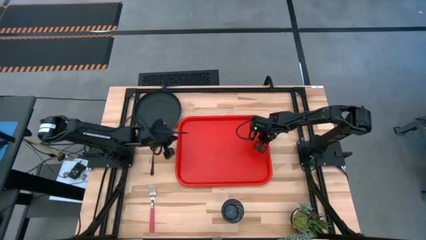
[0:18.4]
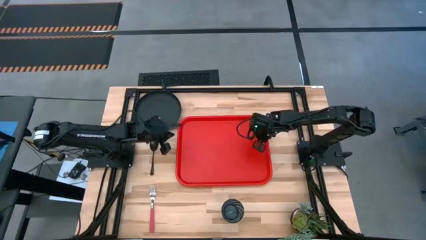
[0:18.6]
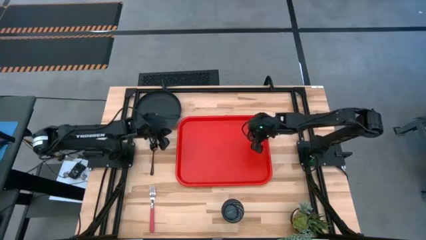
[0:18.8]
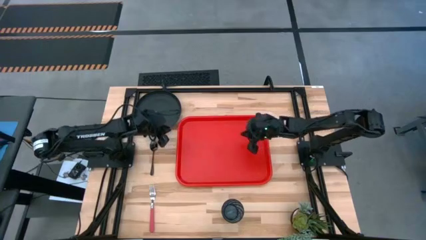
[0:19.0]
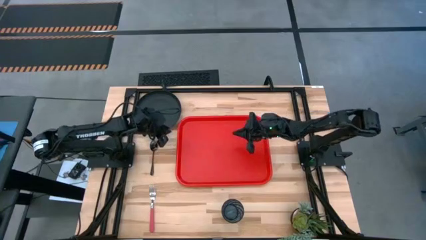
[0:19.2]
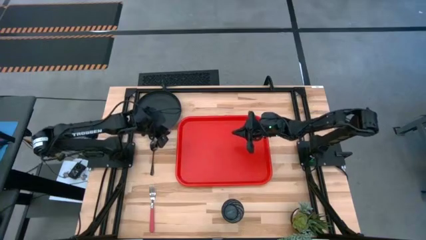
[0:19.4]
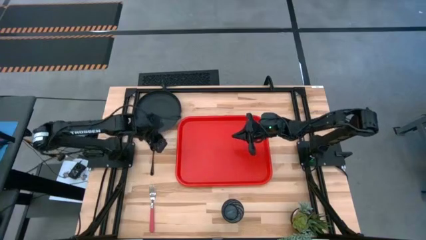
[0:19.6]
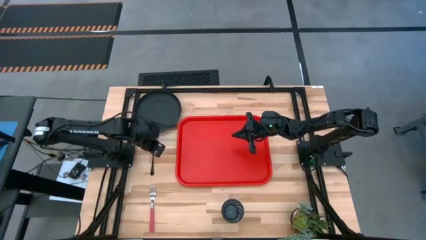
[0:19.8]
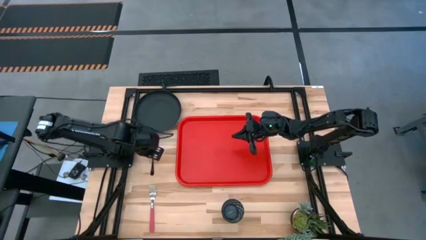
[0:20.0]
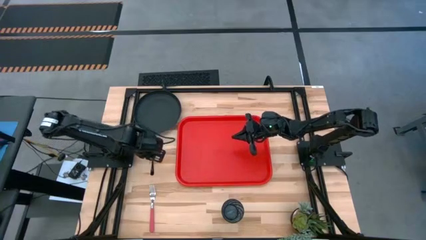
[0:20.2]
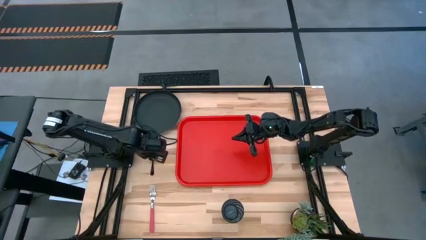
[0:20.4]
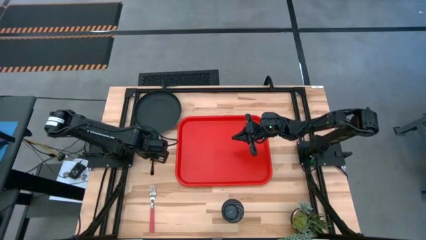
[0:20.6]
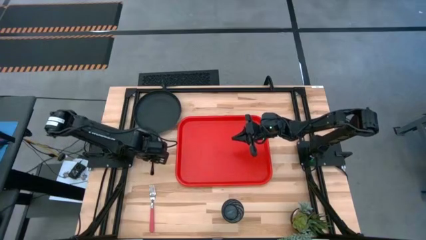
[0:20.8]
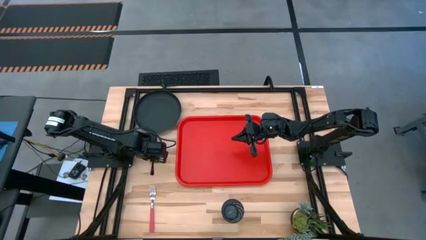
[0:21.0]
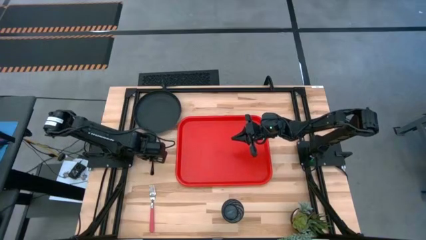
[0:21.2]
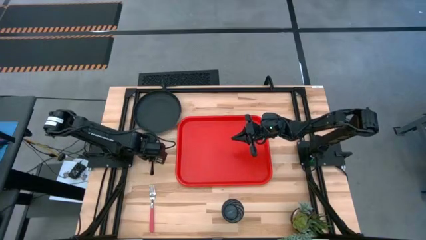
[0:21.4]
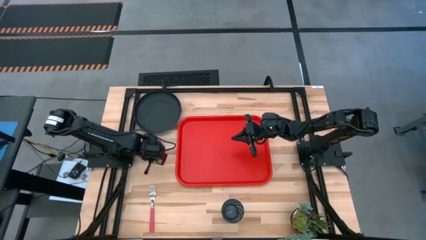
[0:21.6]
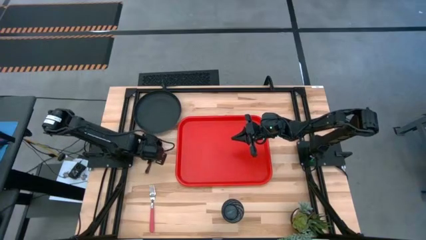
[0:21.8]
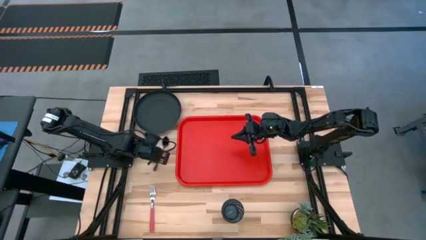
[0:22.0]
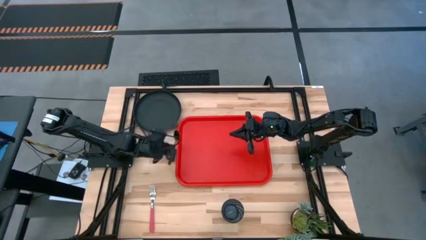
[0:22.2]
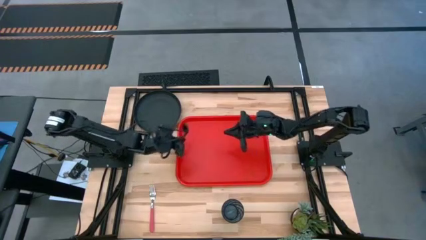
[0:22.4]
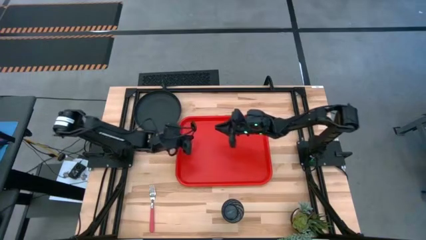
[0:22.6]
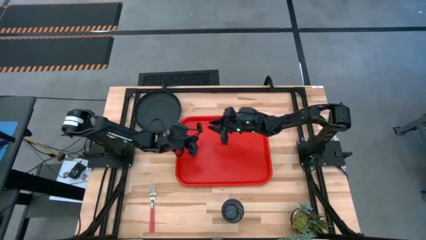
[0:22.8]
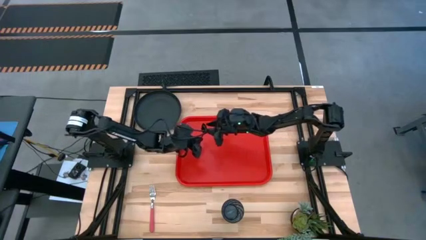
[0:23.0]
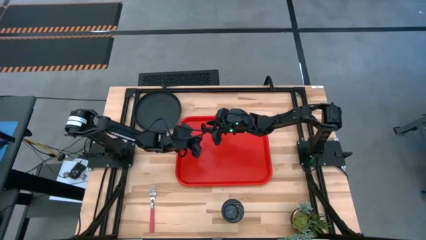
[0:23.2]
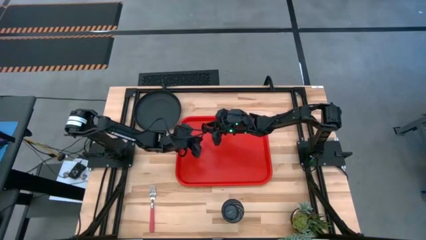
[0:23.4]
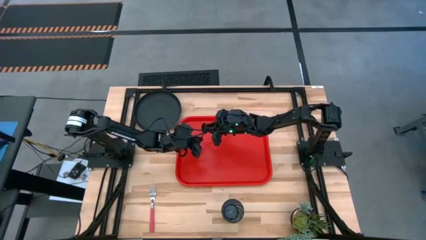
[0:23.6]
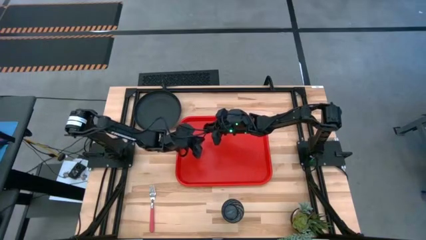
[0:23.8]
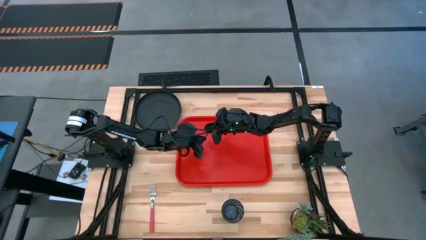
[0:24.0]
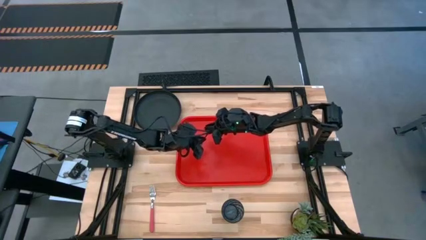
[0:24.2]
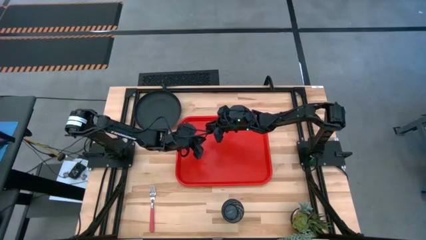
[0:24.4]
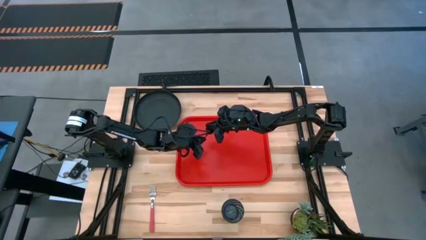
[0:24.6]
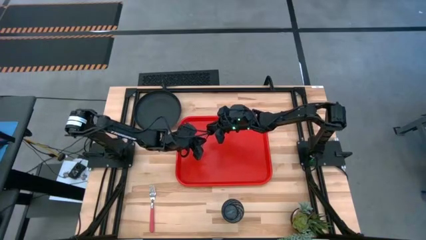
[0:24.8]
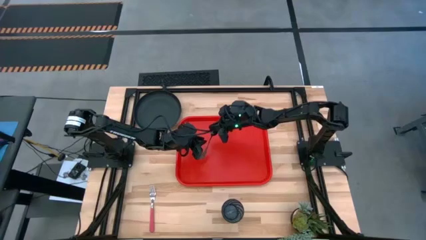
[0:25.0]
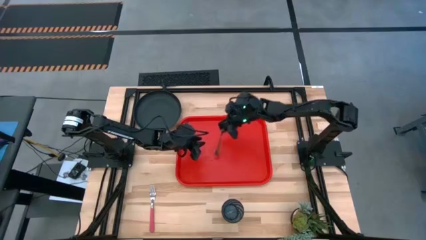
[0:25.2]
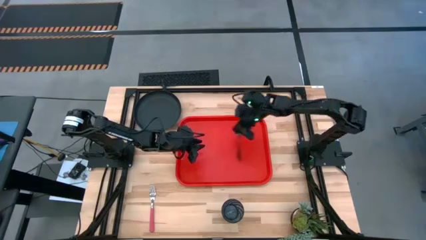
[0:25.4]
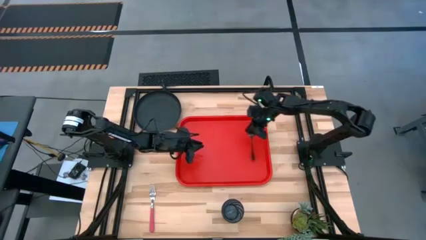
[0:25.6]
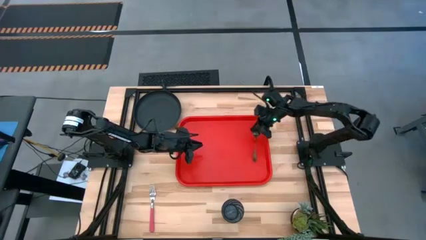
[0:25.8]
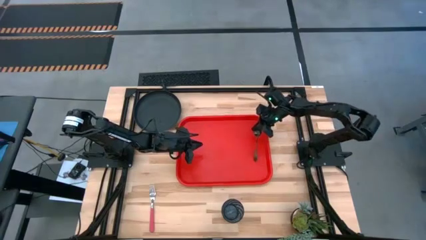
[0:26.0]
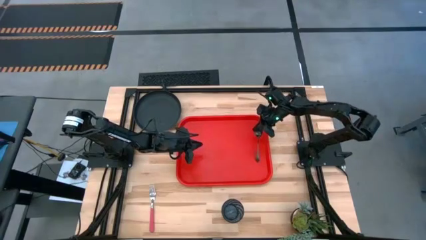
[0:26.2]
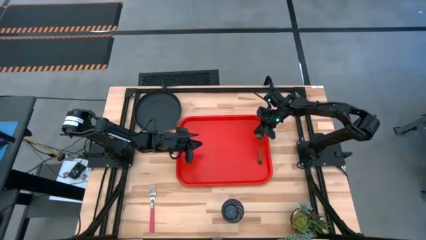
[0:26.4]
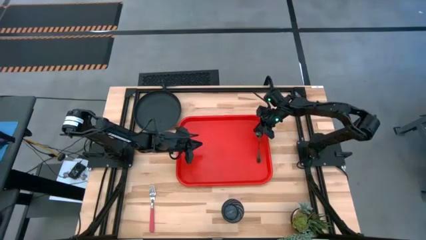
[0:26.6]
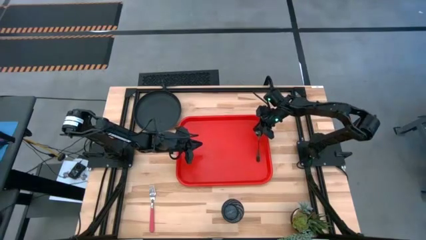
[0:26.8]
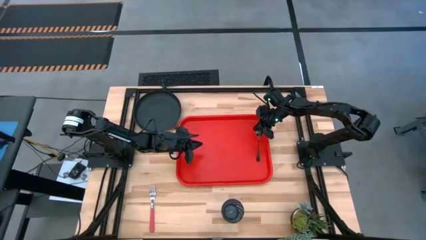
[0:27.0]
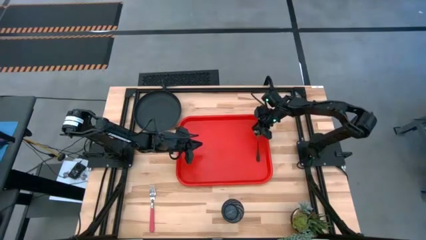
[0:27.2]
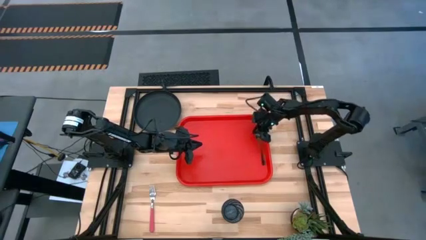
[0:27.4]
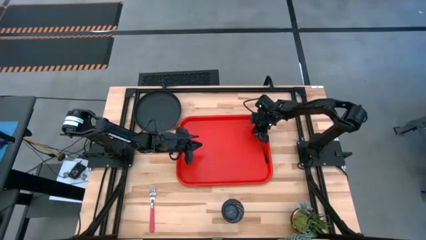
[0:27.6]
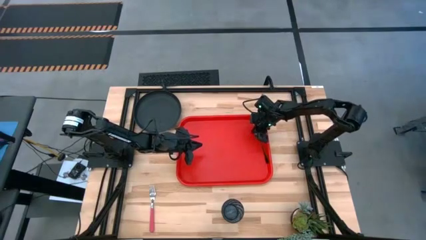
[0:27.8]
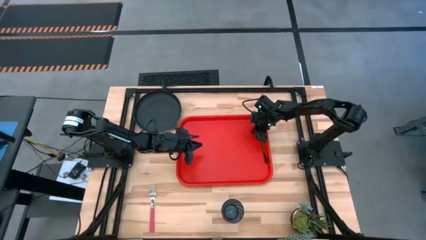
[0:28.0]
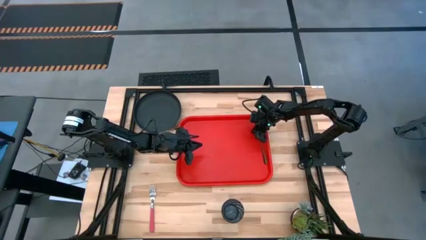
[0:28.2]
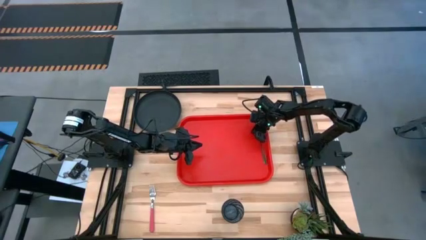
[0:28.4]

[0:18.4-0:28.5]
Task: Pick and place plate/cup/fork/spoon on tray
Put the black spoon on the right of the red serving tray

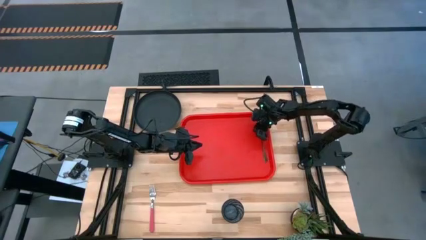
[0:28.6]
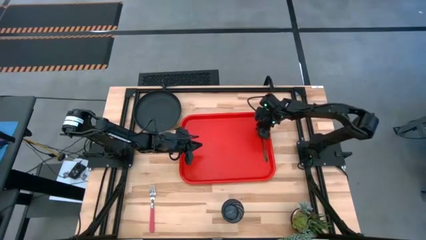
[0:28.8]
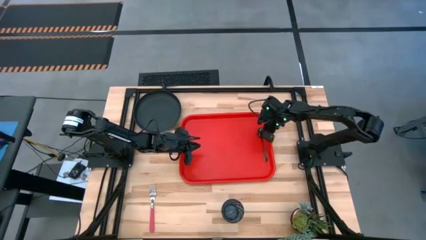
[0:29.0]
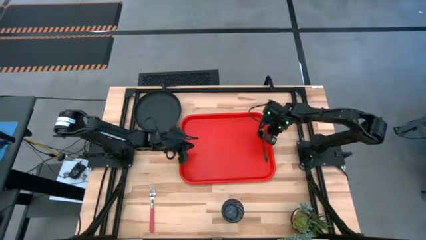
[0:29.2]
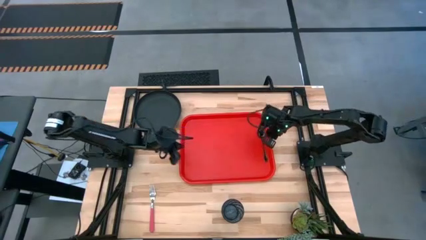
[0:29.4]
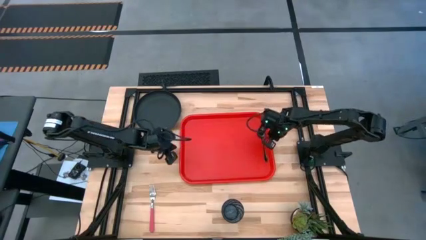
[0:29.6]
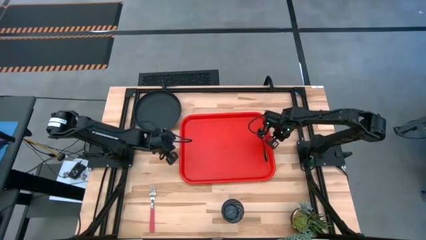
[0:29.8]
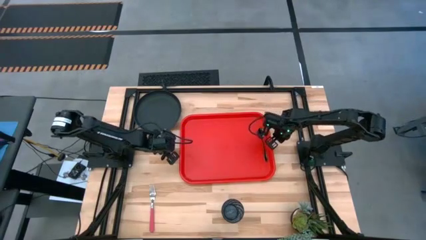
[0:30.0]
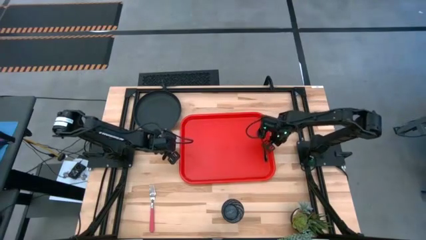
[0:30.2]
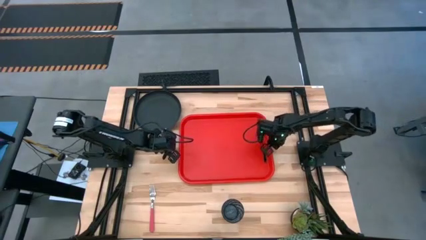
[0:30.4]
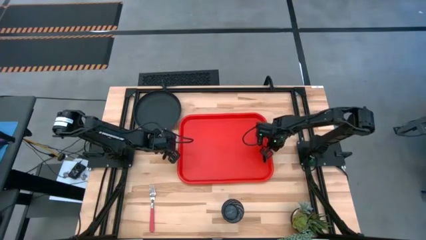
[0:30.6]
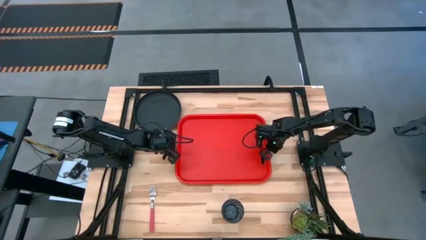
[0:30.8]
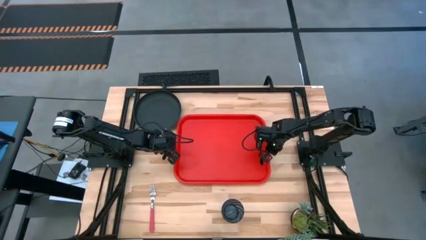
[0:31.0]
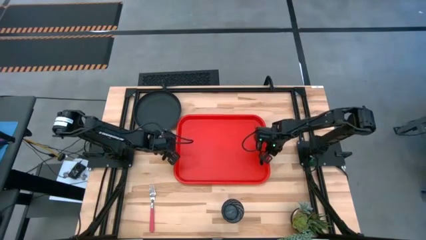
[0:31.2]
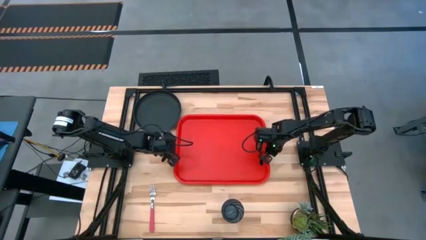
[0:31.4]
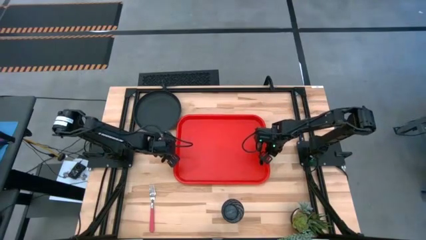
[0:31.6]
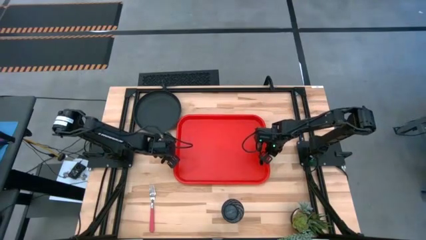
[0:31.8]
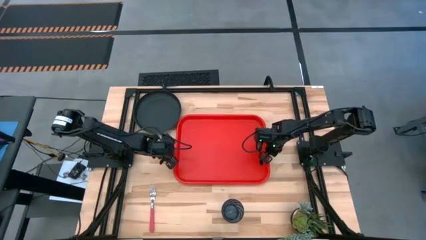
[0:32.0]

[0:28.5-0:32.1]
Adjust the red serving tray

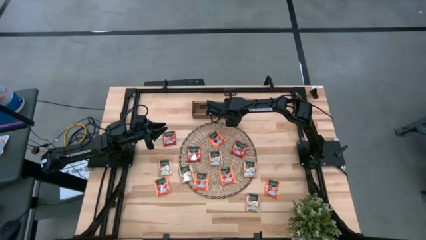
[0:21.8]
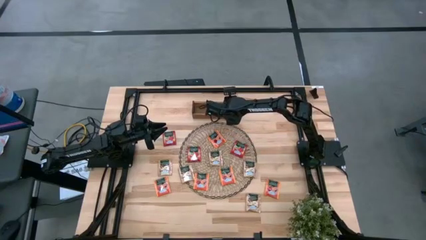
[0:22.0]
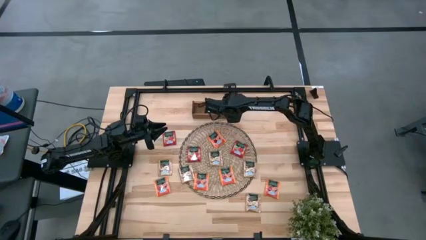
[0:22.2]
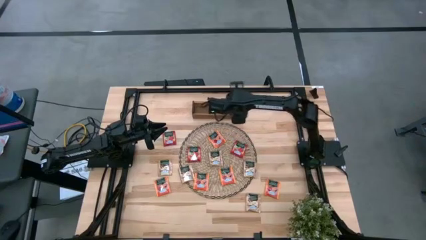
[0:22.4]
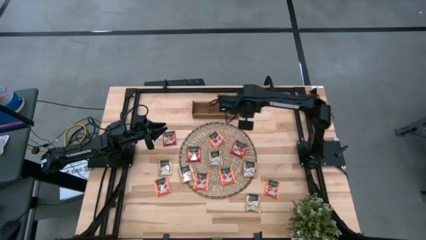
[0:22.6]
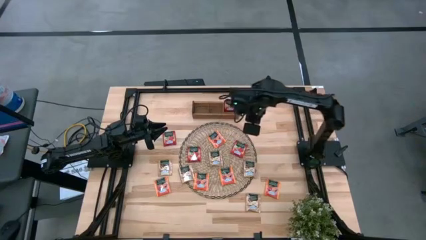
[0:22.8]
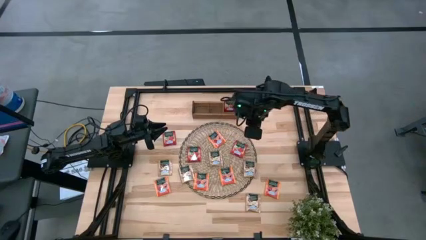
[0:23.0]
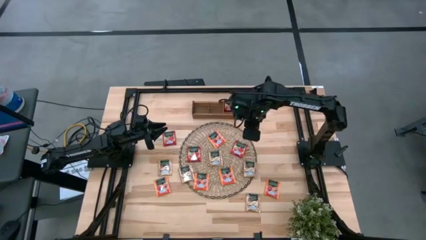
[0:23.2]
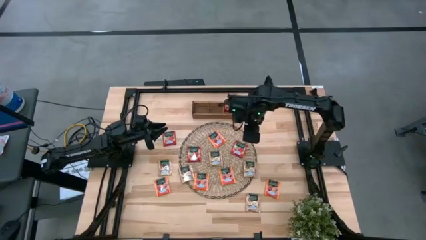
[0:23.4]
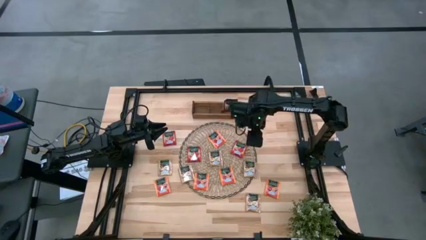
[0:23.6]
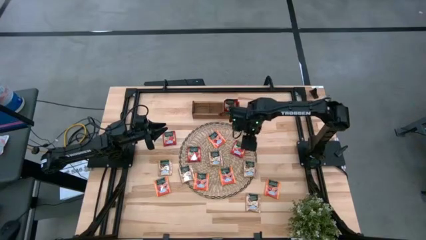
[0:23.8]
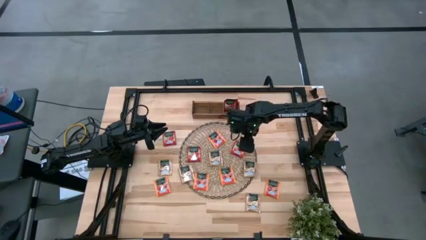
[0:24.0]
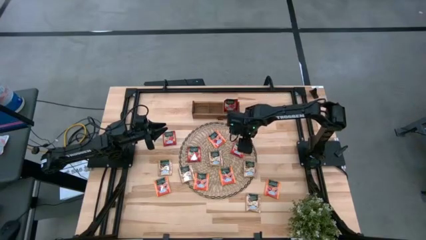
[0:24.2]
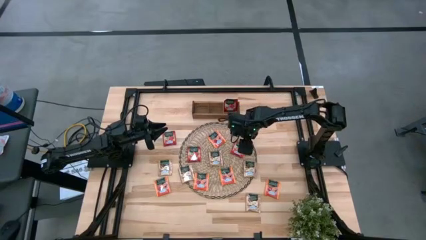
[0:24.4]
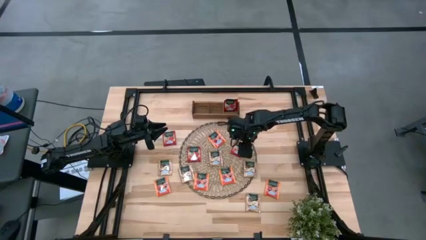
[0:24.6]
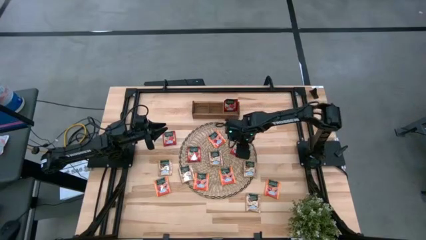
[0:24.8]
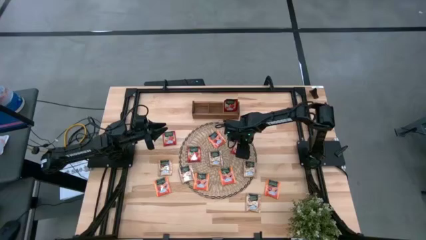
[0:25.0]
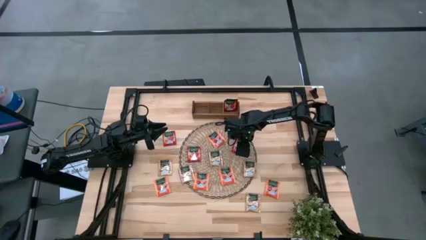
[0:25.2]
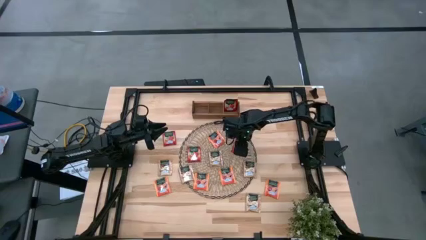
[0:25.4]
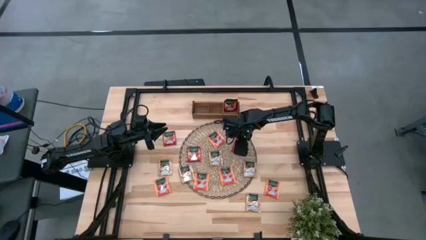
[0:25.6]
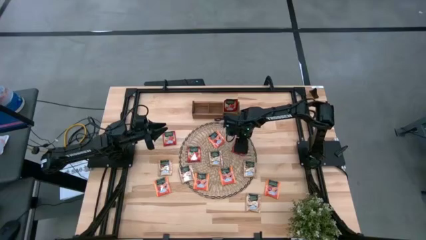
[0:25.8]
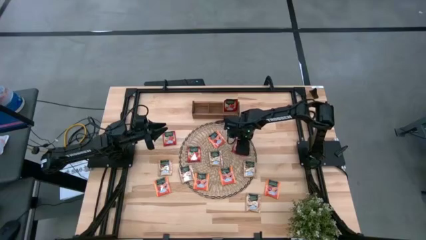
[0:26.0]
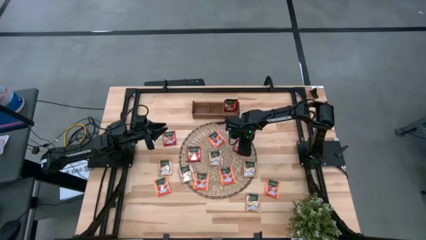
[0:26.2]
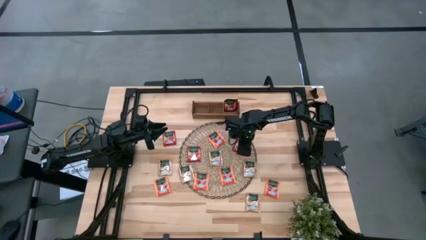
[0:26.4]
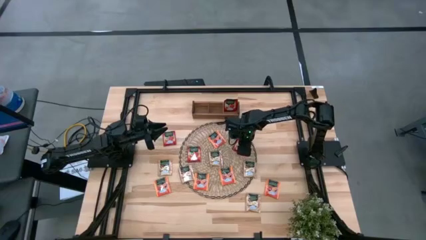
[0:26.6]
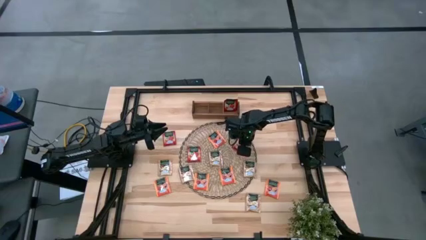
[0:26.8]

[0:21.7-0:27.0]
Task: Pick & Place Tea
Put the red tea bag into the right section of the wooden organizer
